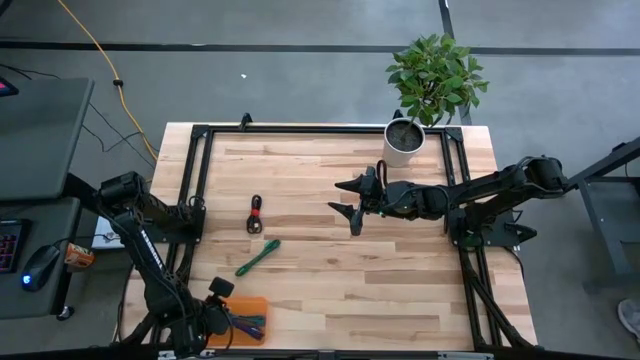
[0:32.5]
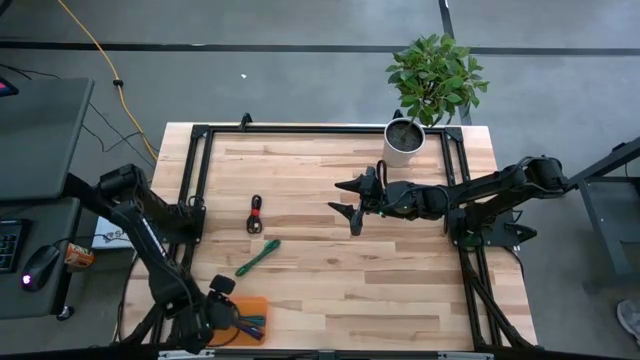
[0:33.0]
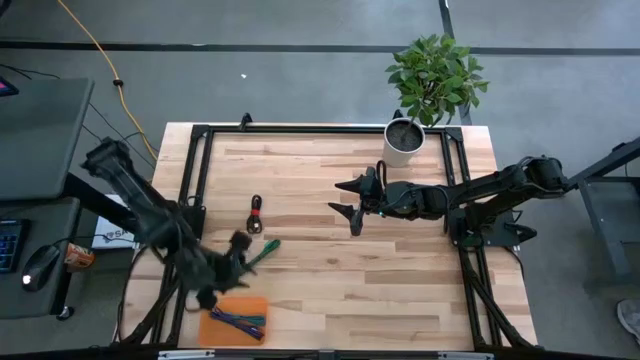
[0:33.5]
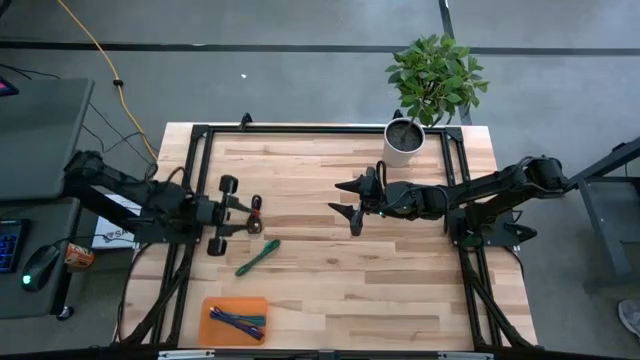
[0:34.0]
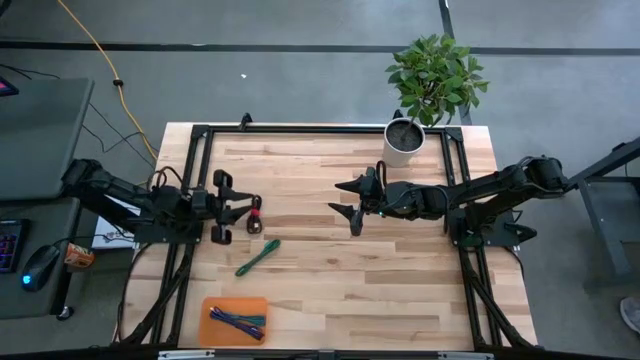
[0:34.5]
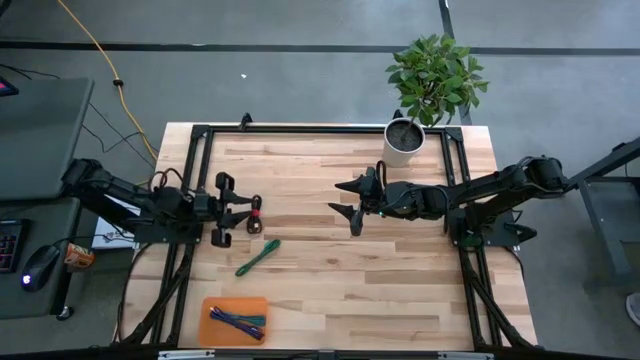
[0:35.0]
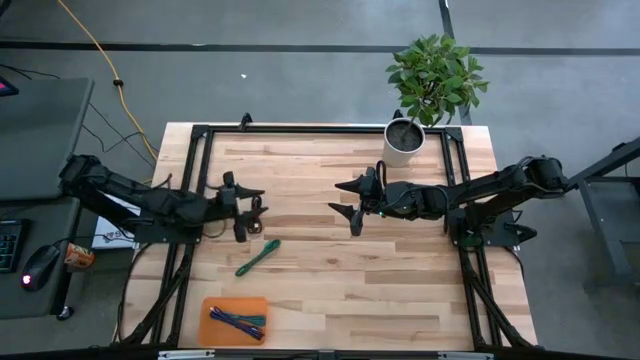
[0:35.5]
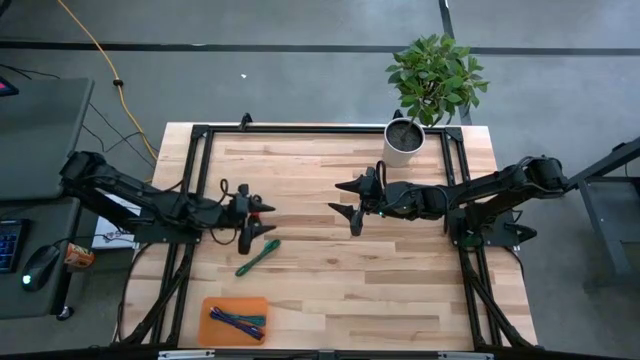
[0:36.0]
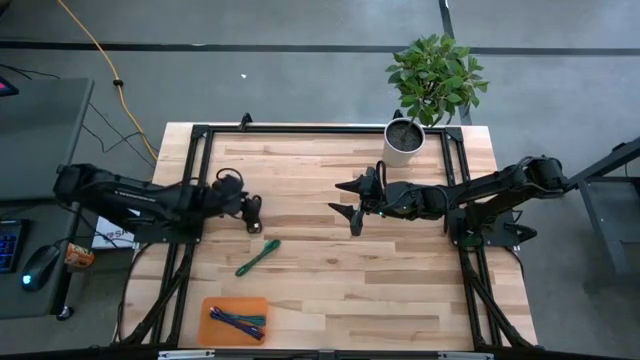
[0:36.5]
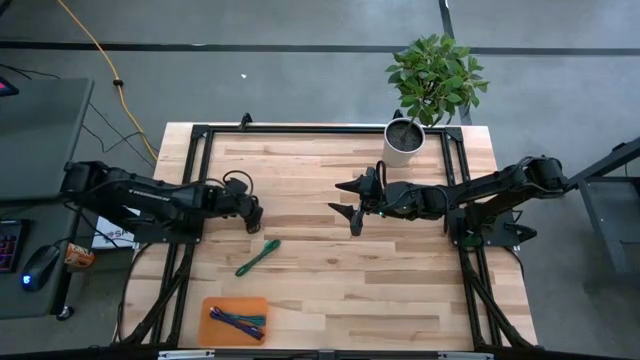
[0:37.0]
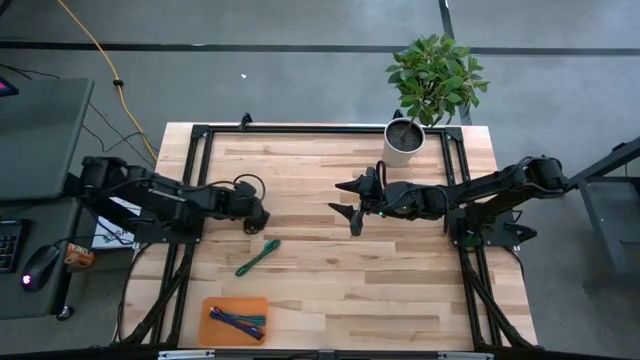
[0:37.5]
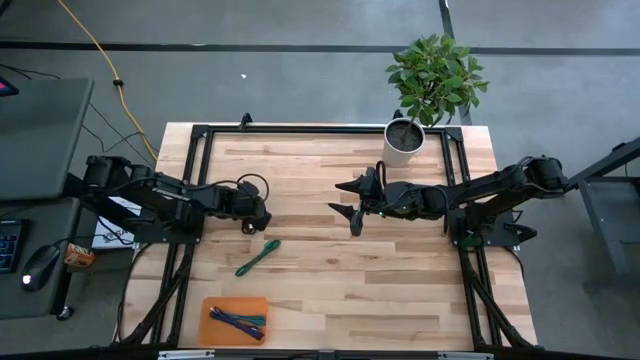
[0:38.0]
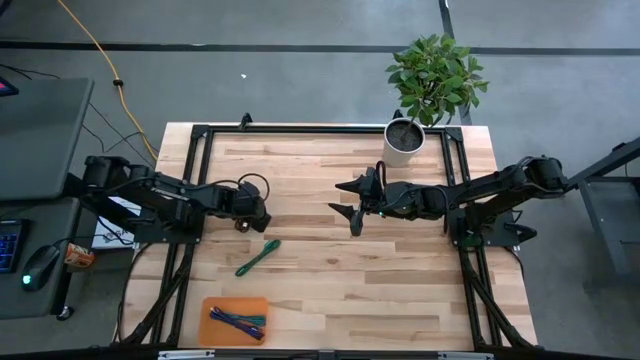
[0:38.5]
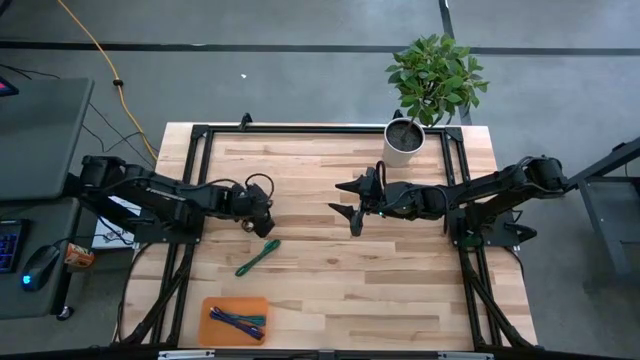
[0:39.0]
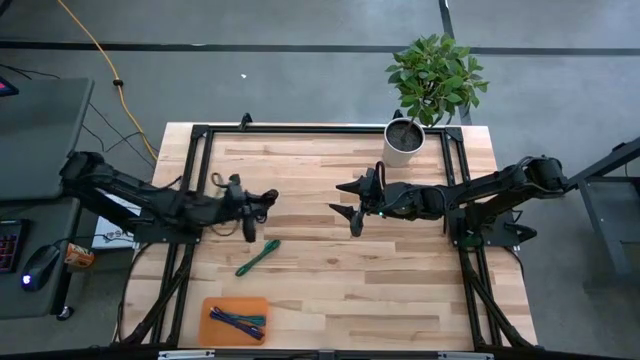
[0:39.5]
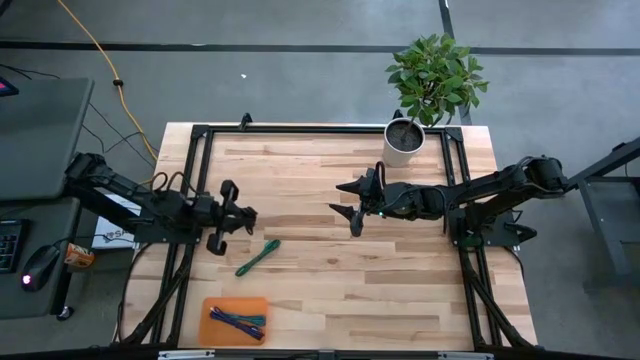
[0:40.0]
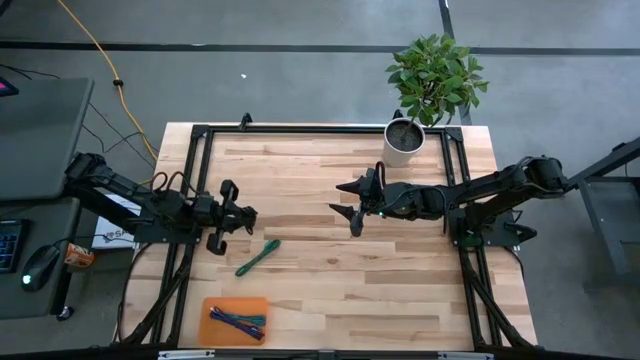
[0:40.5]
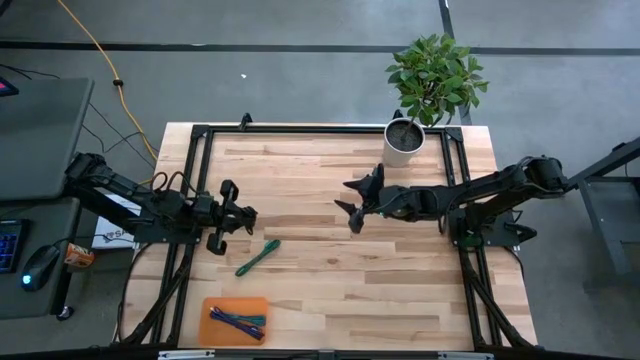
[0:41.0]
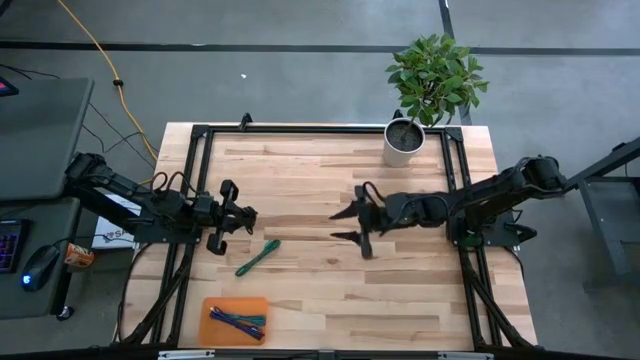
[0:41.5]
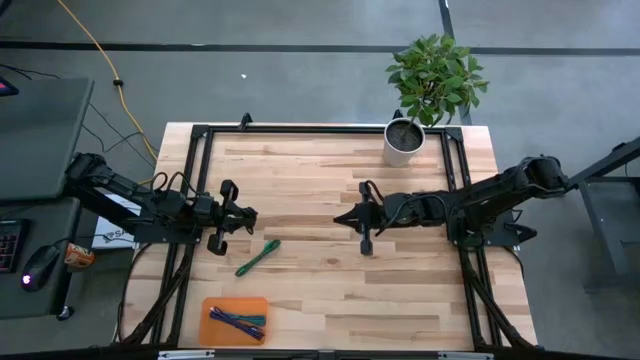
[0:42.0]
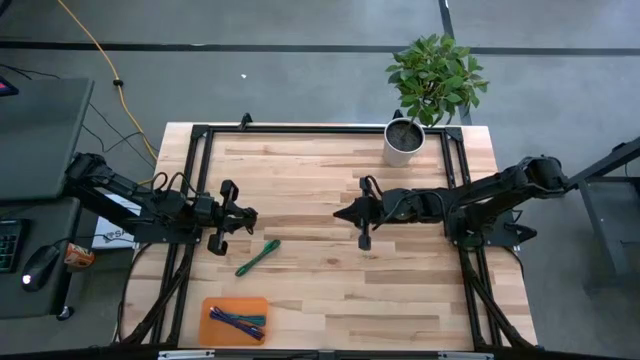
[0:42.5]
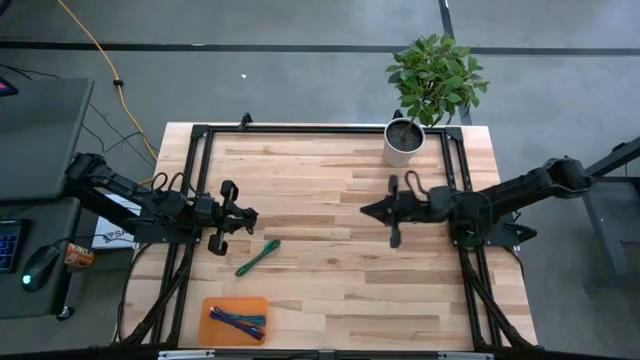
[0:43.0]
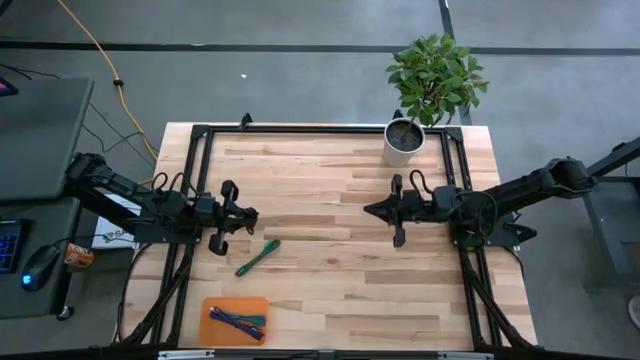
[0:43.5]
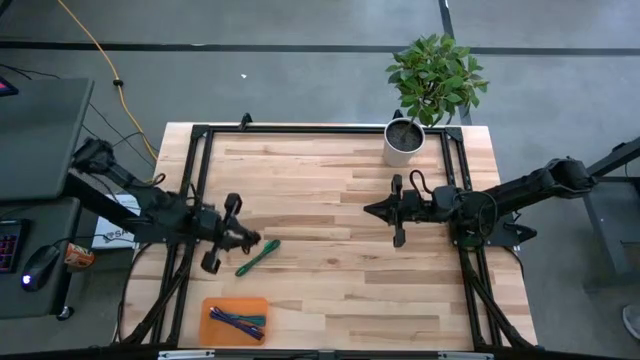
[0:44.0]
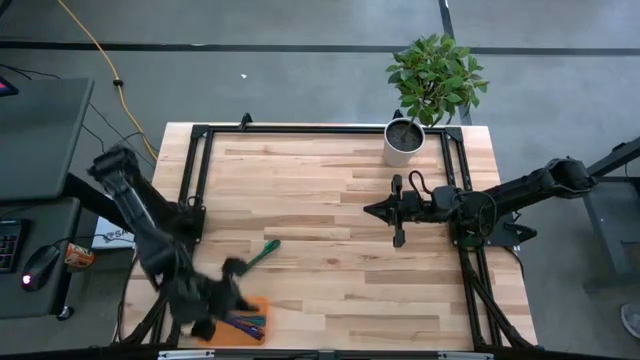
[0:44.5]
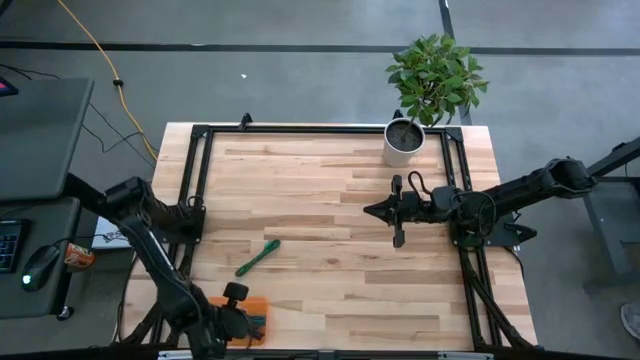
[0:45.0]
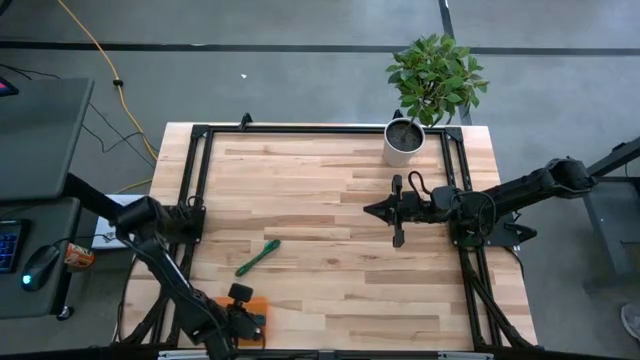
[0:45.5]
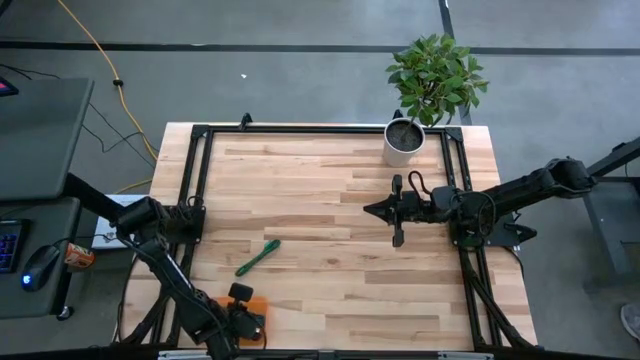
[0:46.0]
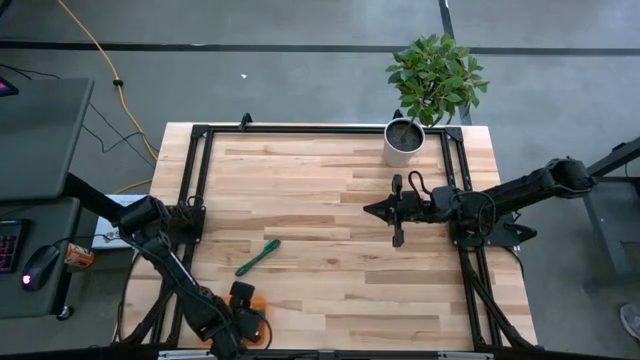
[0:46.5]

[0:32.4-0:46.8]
Task: Pick and place USB-C Cables
Put the black charger cable into the orange bin

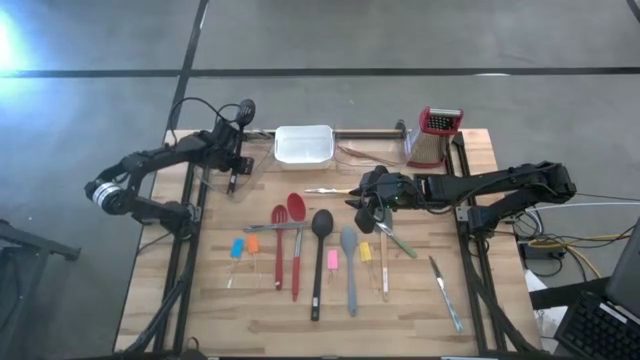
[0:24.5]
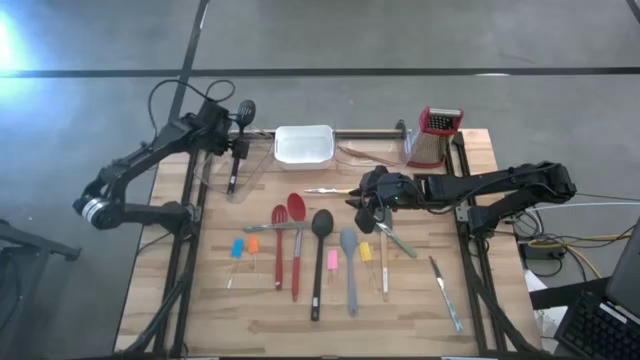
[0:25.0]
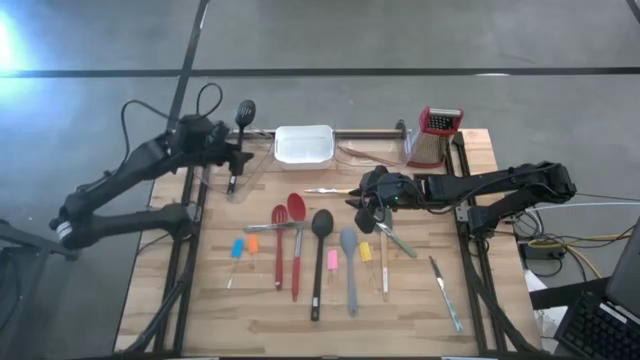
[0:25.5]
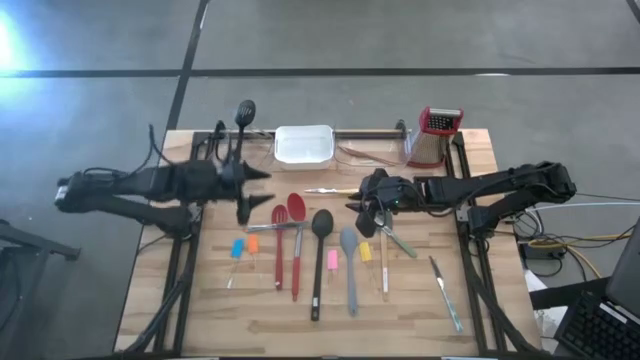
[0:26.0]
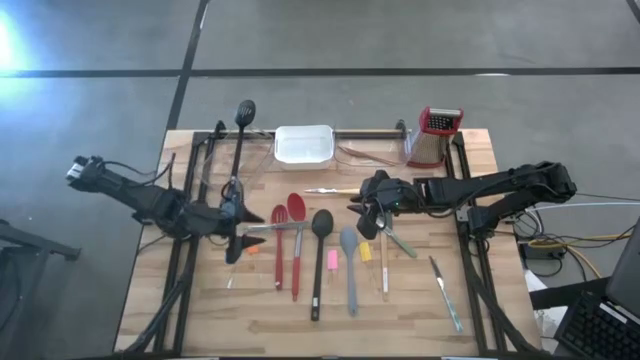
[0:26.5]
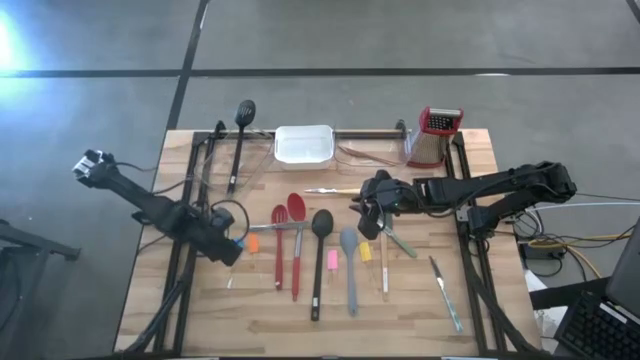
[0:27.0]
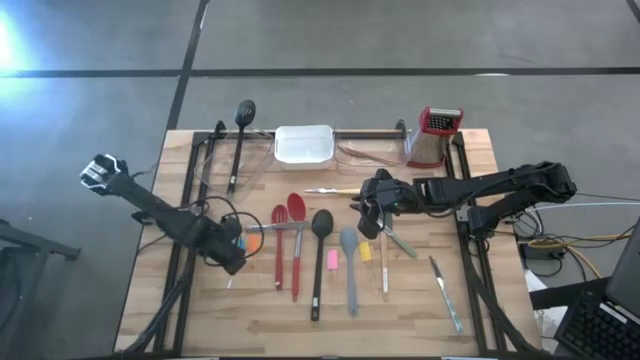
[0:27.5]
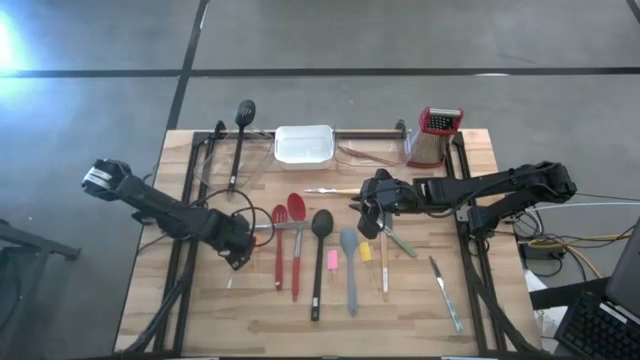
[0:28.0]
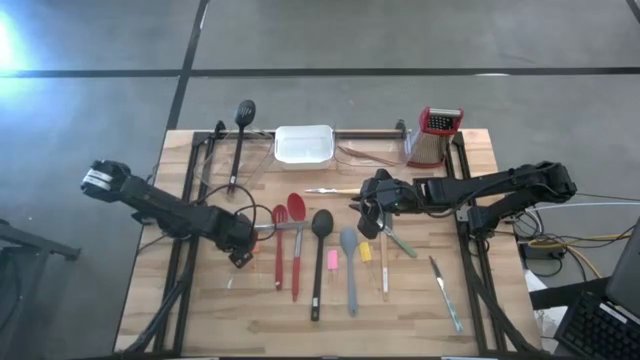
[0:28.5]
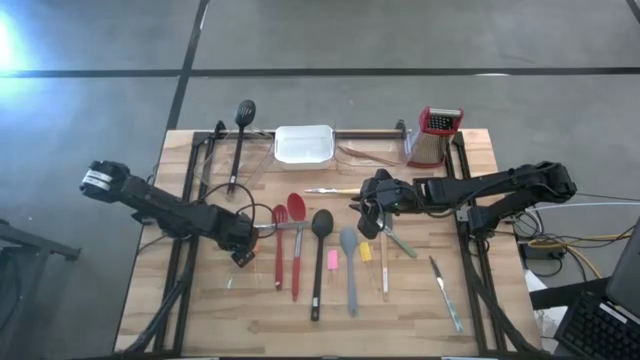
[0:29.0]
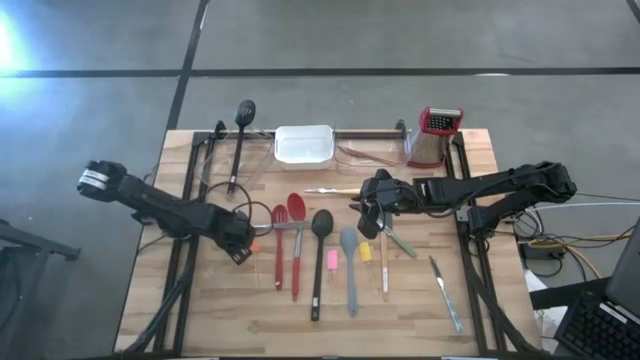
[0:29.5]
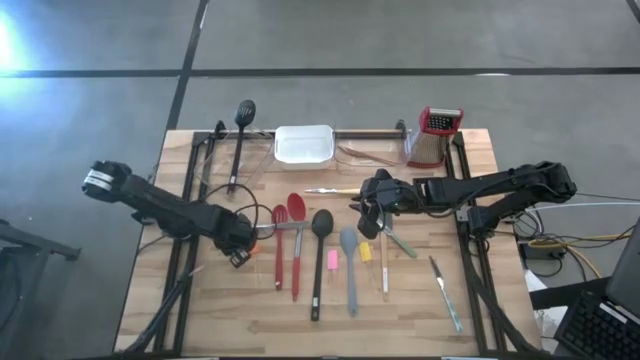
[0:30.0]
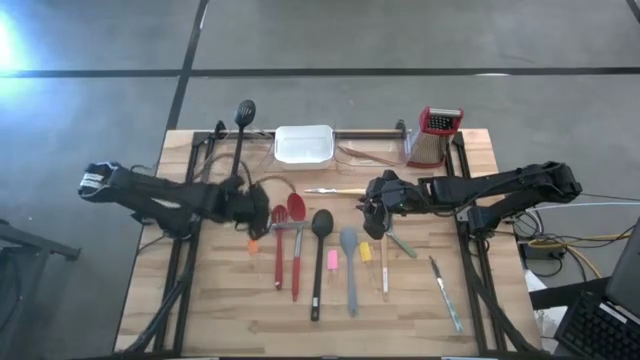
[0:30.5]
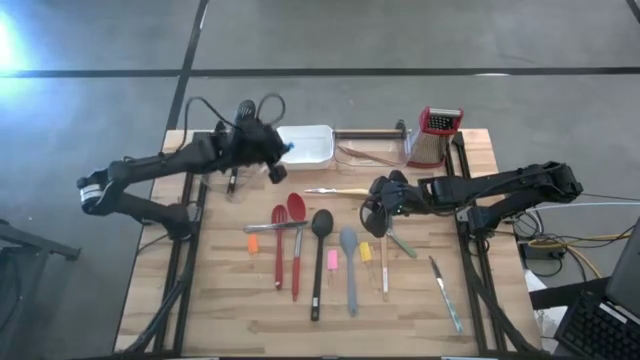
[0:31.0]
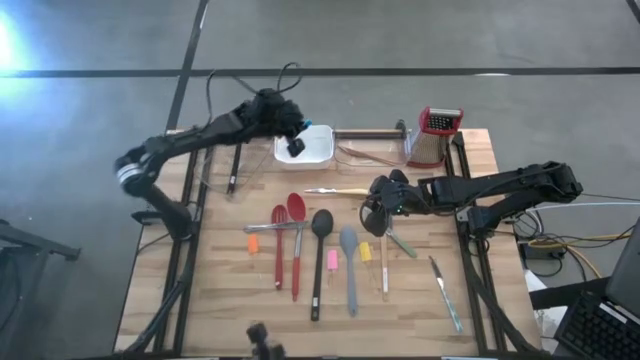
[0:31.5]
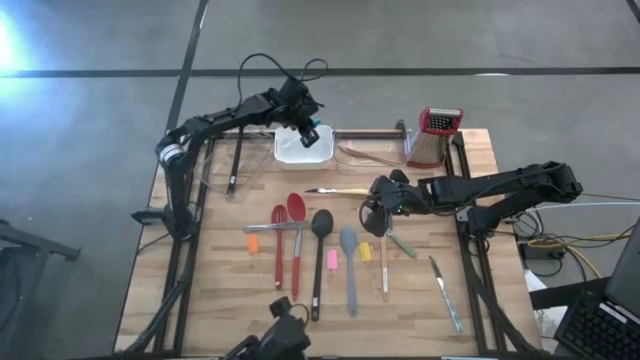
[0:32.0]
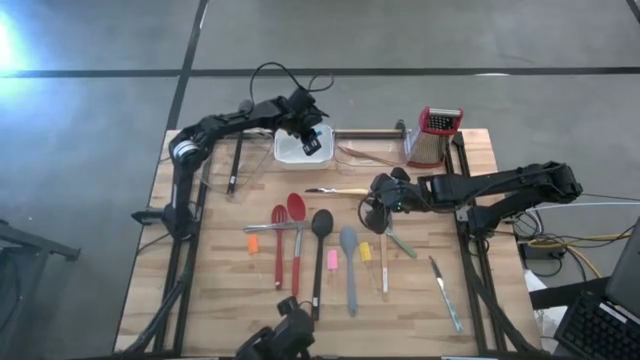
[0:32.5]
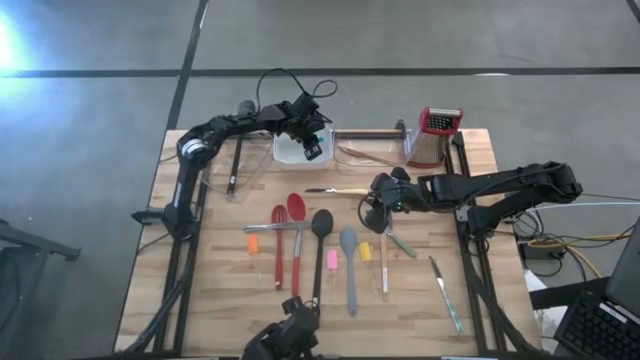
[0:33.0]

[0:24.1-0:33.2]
Task: Pick & Place Kitchen Items
Put the blue spatula into the white bin
